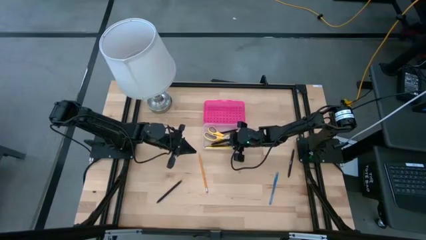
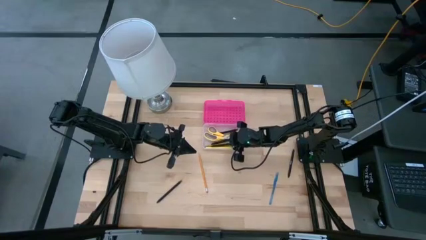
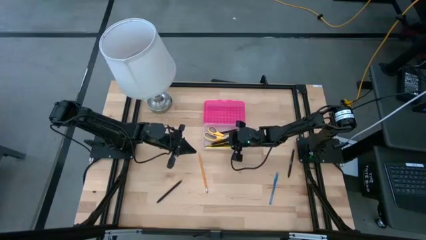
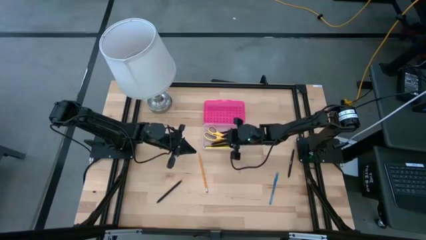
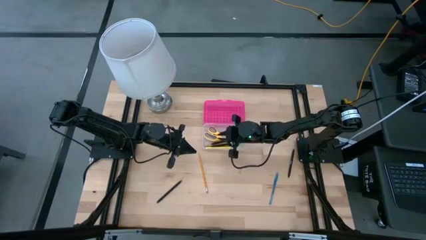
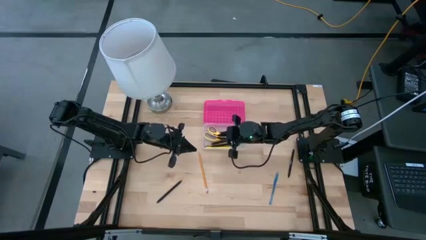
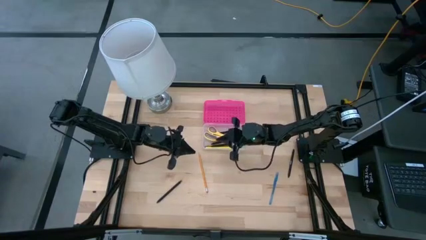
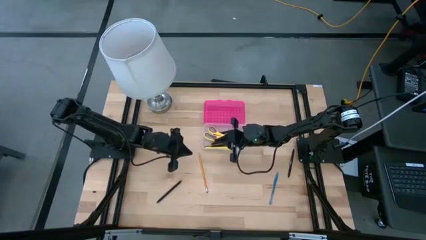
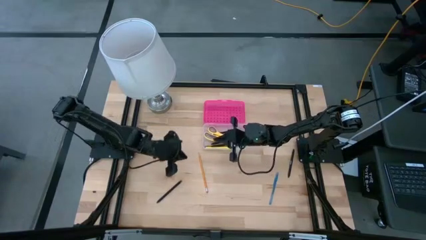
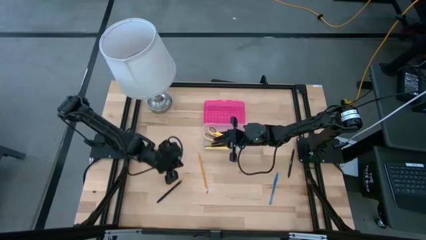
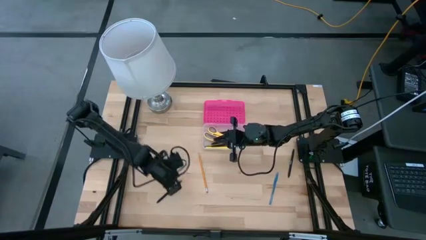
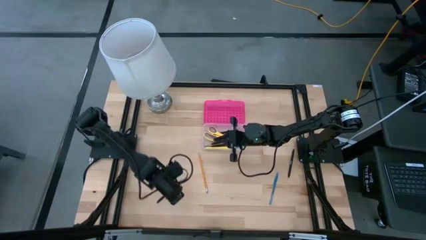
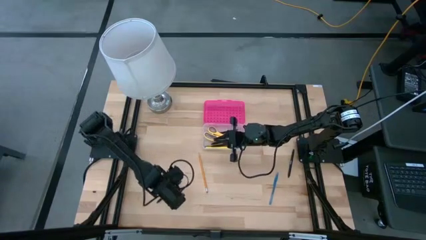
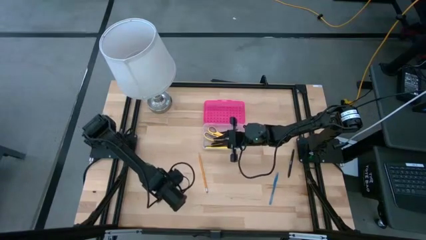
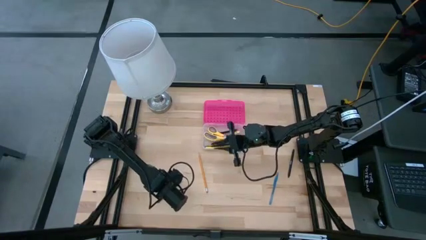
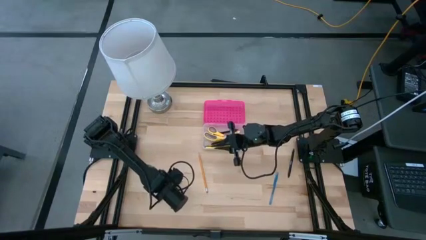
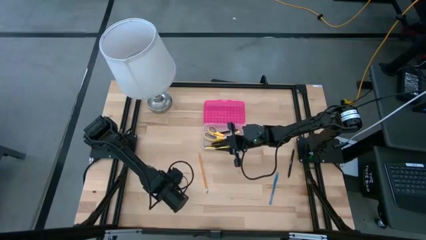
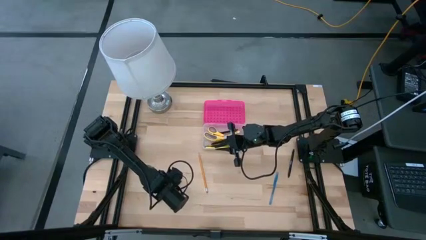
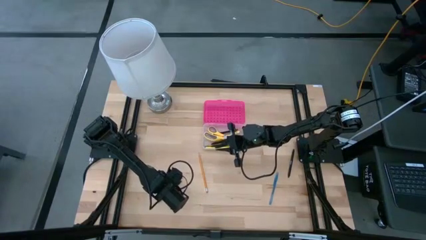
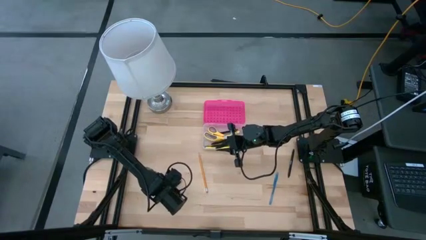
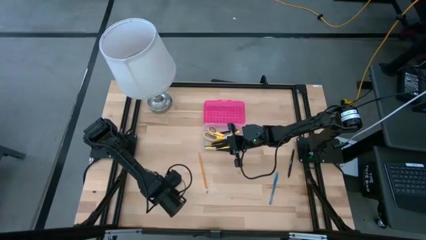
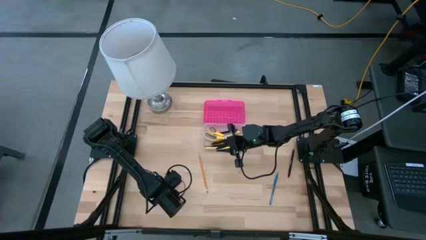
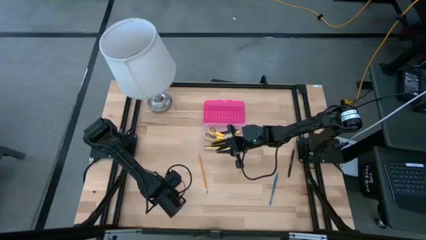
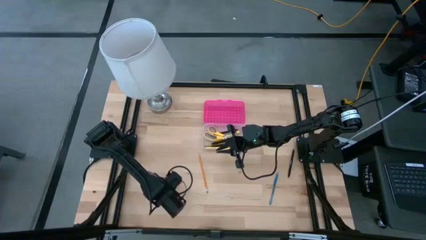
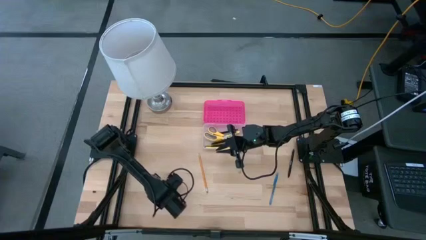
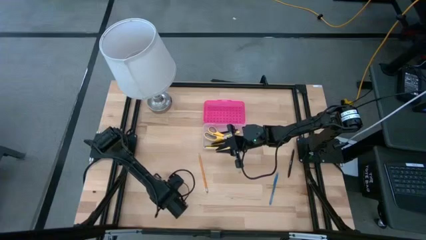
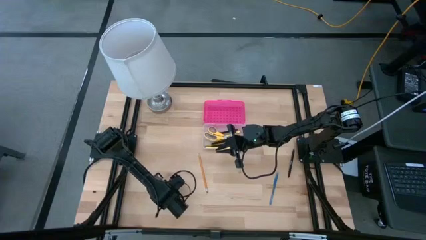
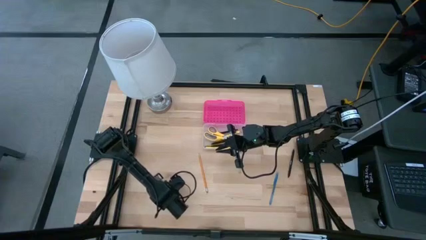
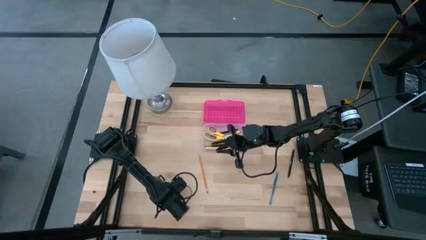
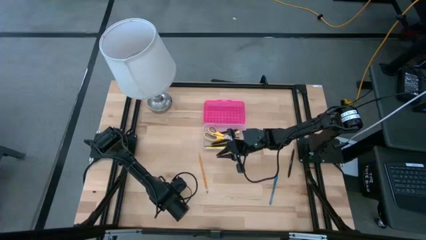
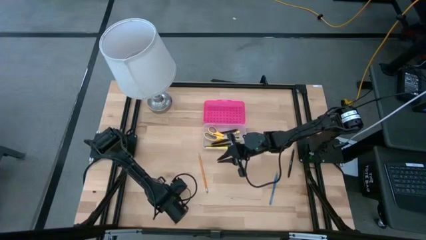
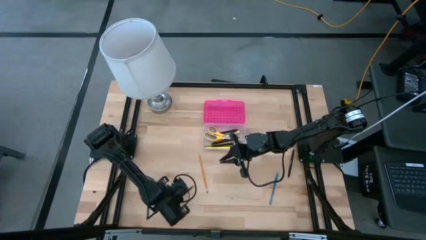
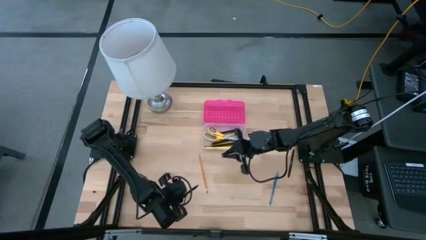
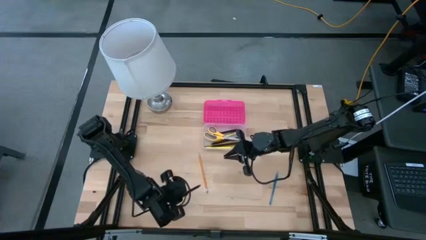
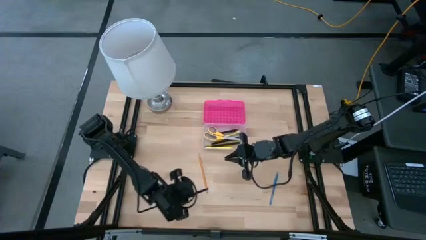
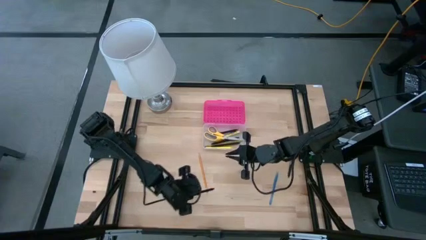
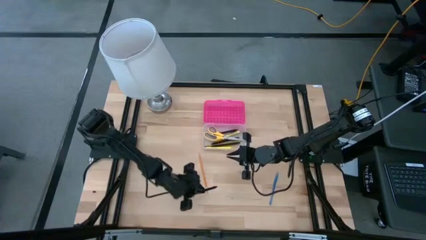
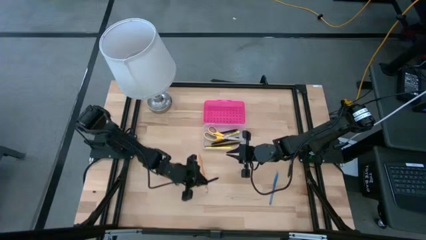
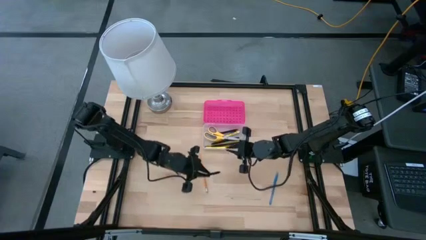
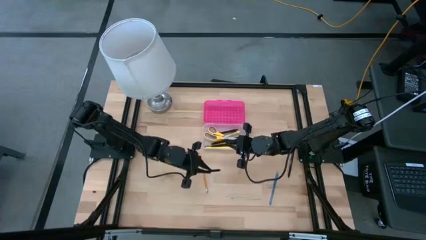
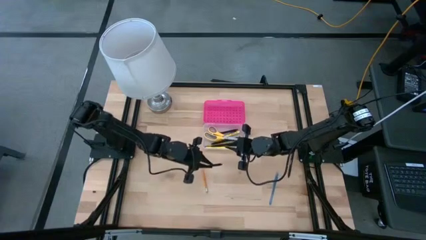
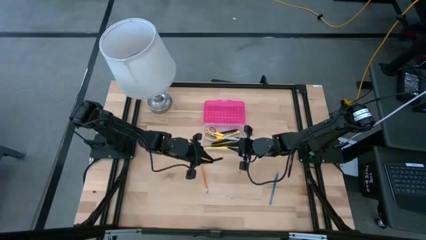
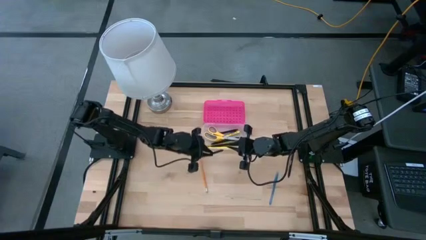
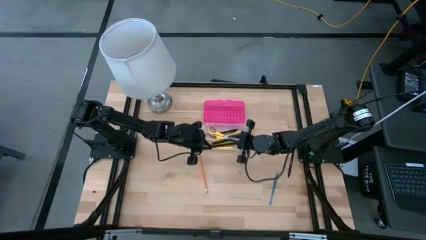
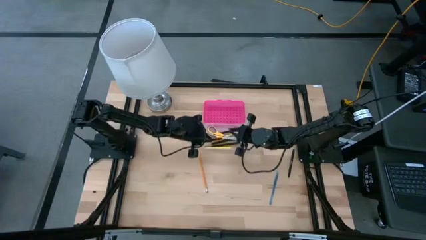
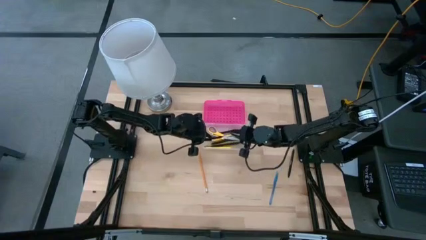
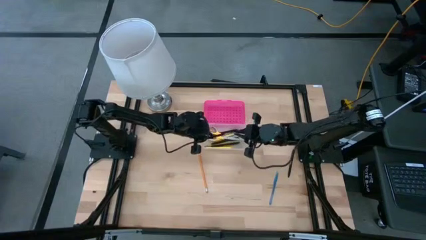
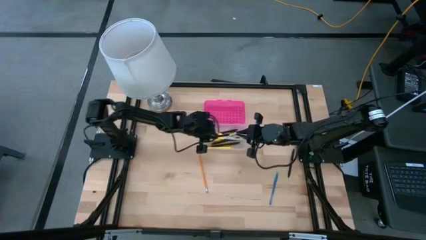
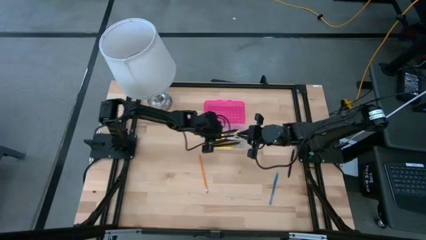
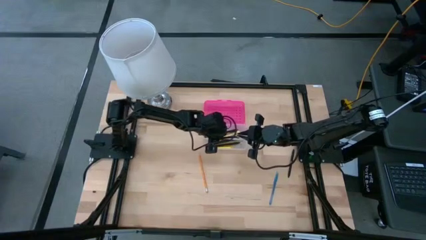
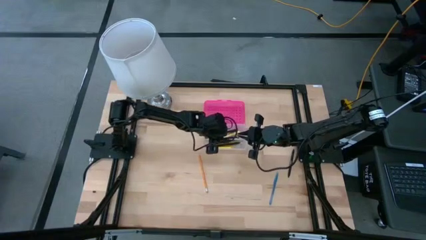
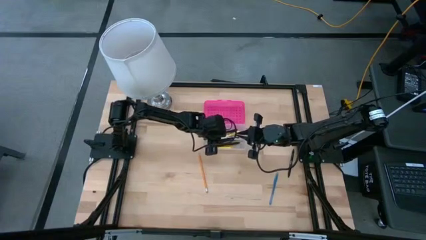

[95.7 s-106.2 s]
Task: Pick & place school supplies into a supply box
Put the black pen into the pink supply box

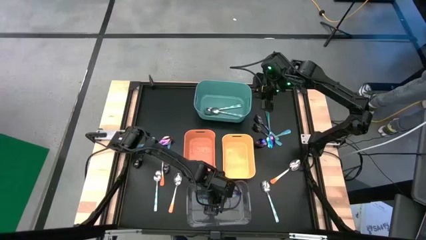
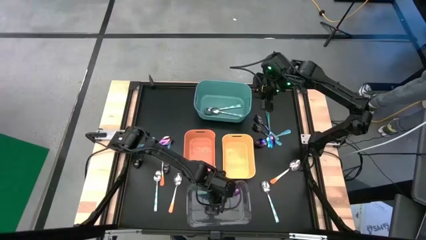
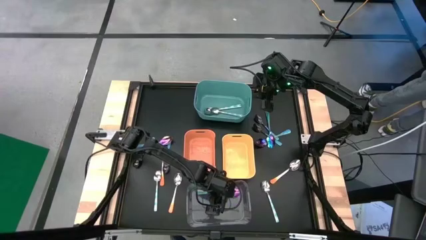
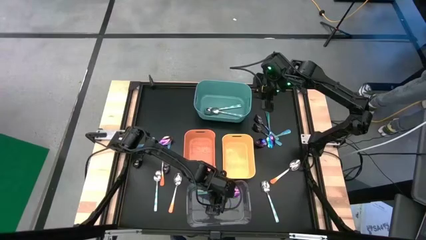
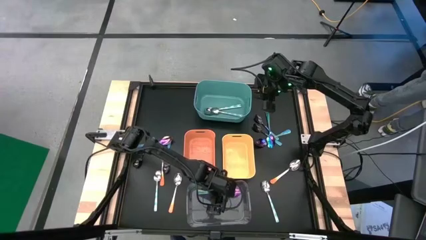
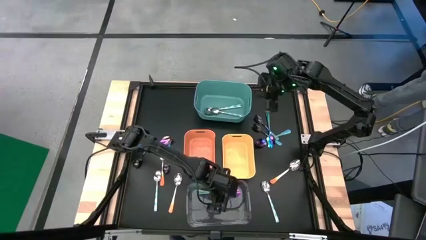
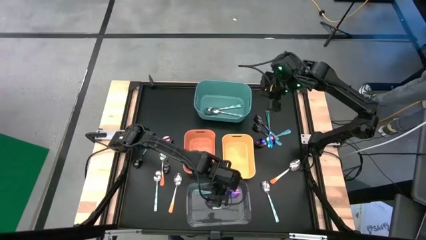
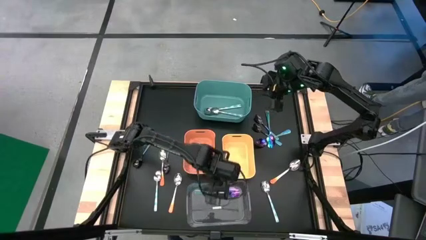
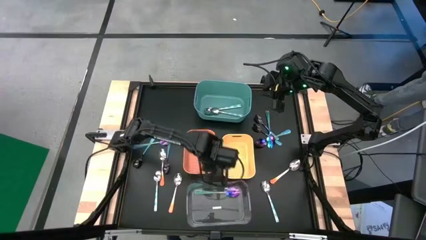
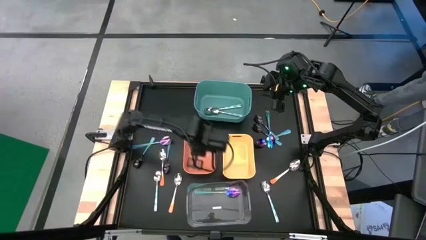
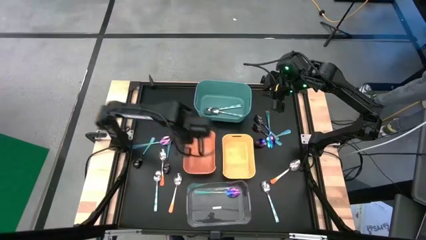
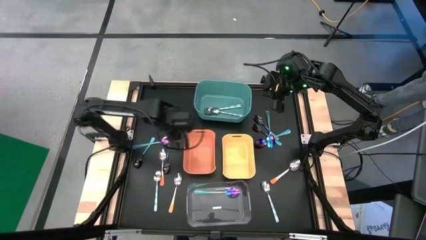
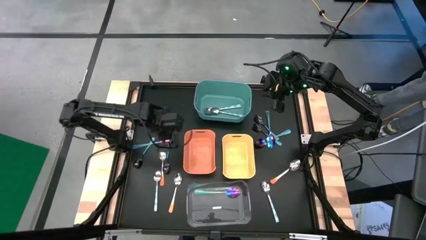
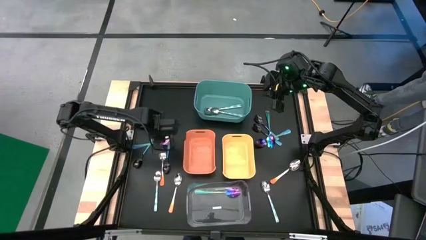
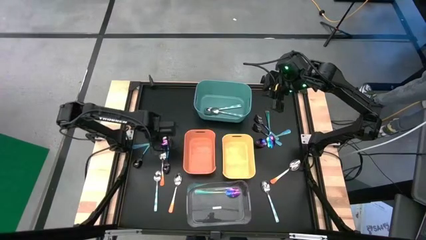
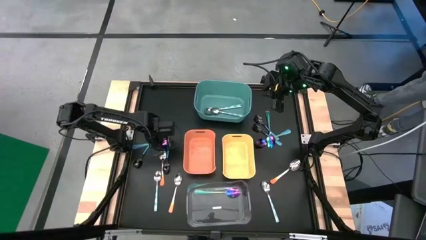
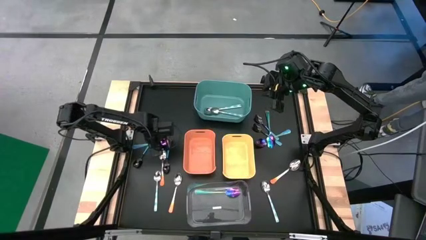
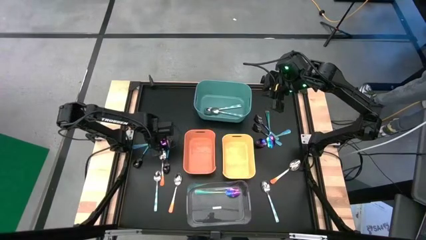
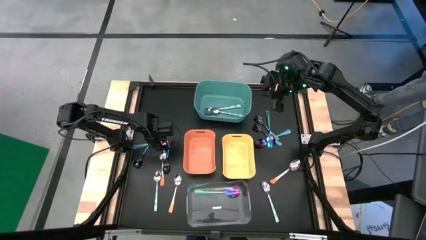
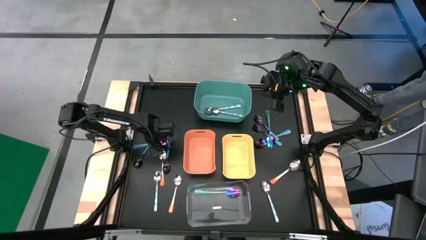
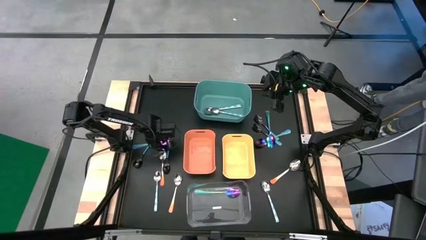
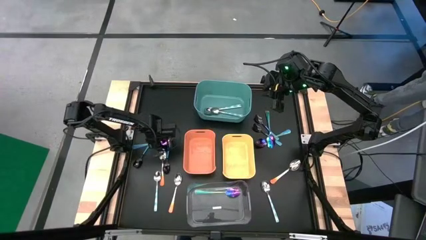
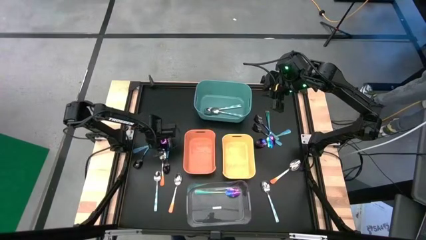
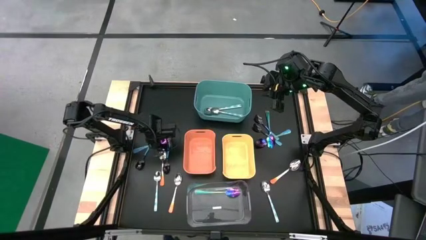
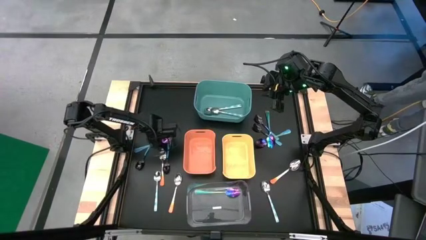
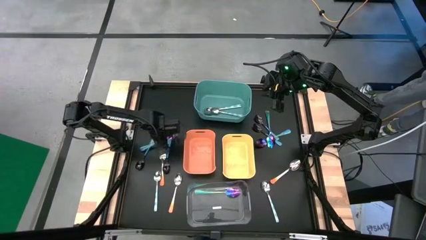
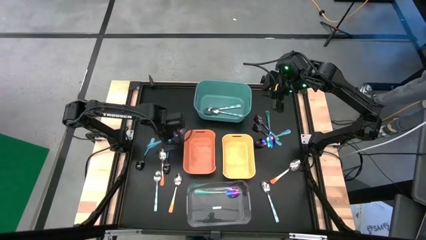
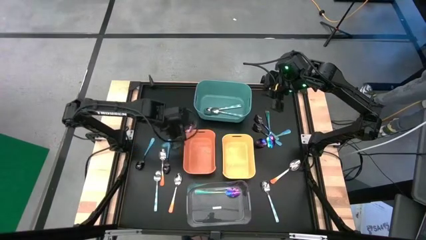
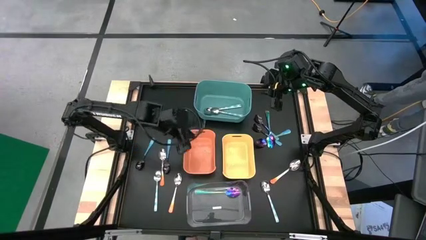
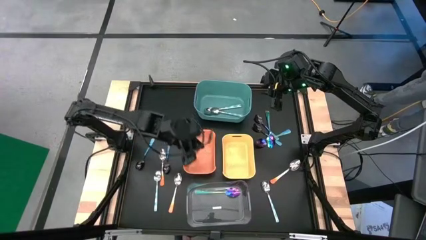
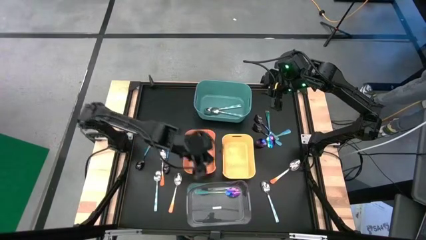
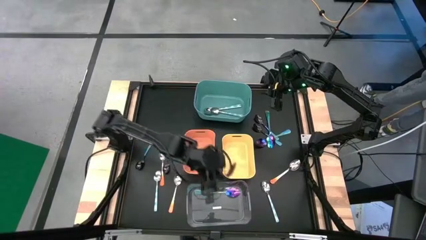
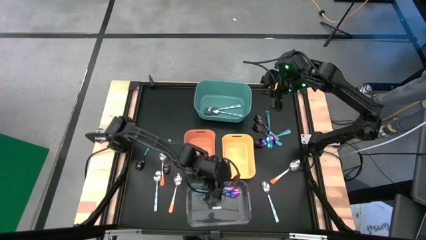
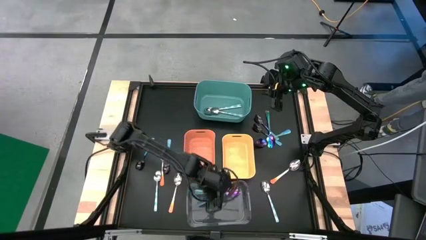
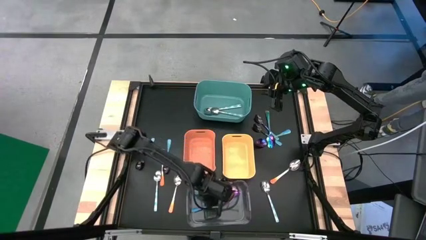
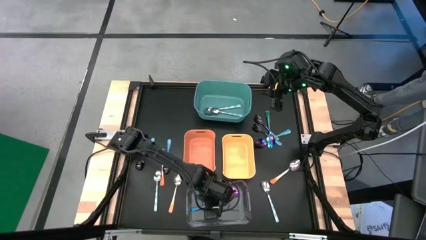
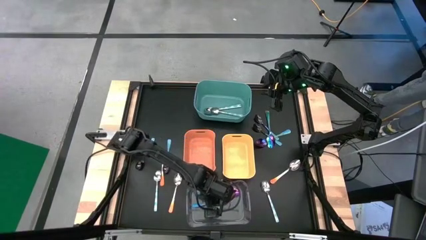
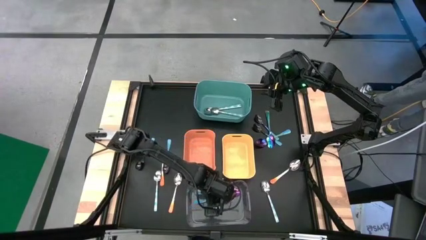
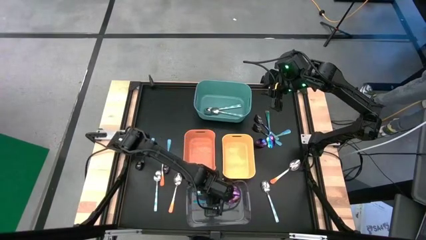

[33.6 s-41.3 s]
Task: Sort silverware by color (type)
Put the blue spoon into the transparent bin
